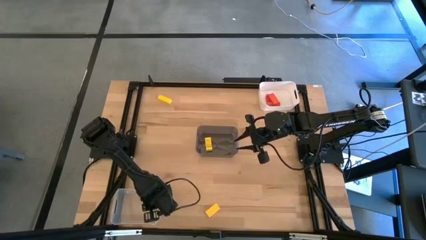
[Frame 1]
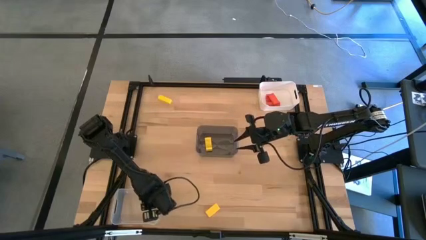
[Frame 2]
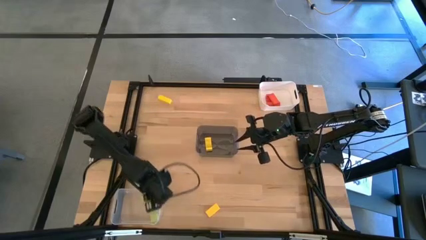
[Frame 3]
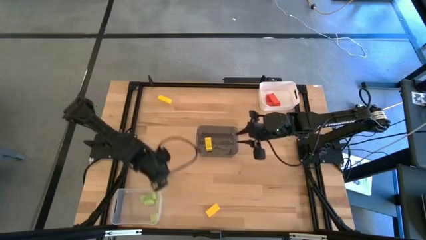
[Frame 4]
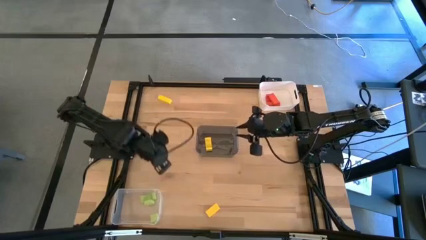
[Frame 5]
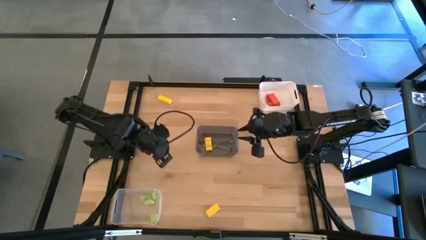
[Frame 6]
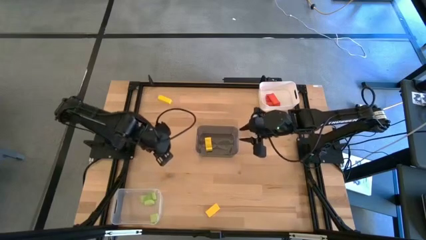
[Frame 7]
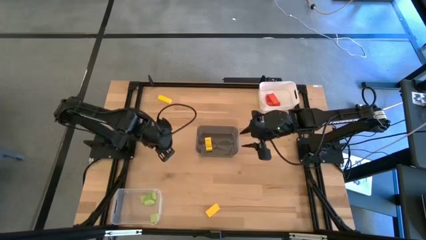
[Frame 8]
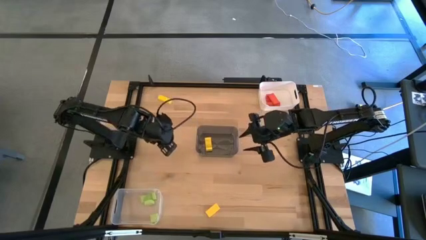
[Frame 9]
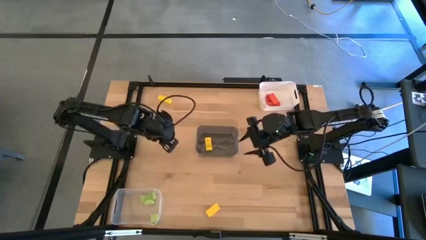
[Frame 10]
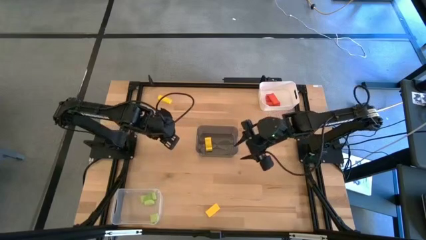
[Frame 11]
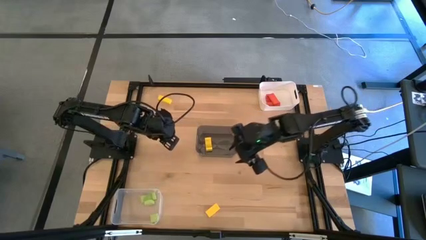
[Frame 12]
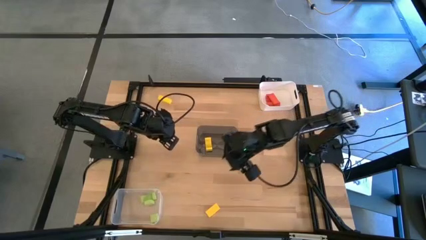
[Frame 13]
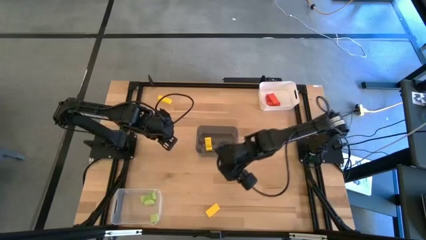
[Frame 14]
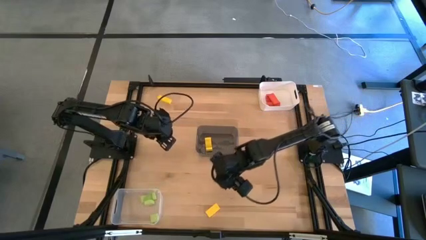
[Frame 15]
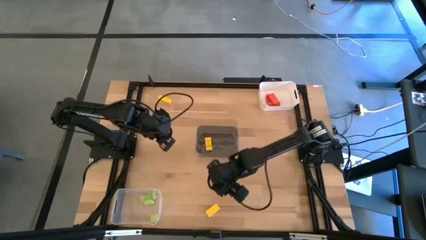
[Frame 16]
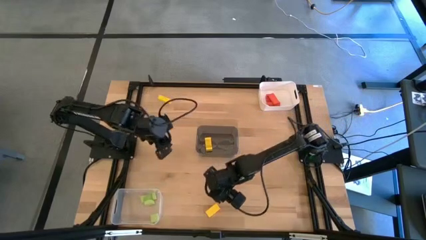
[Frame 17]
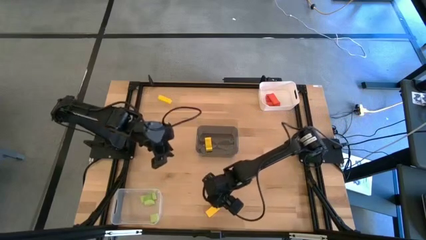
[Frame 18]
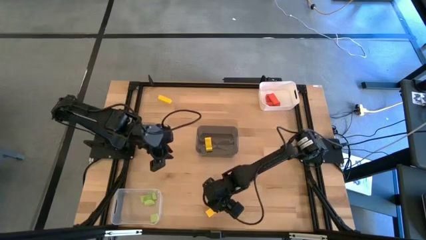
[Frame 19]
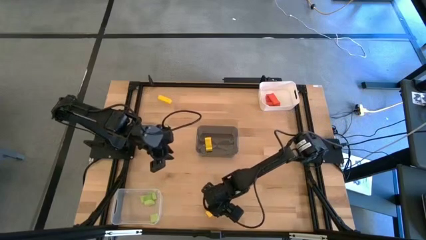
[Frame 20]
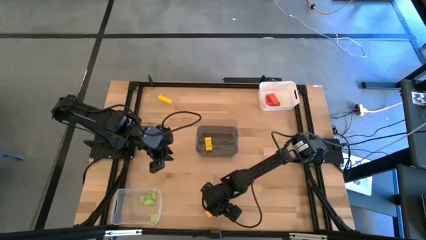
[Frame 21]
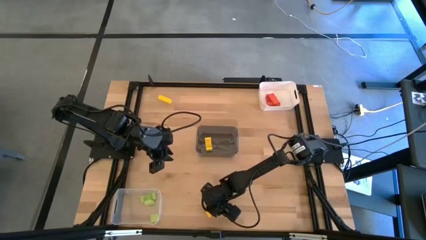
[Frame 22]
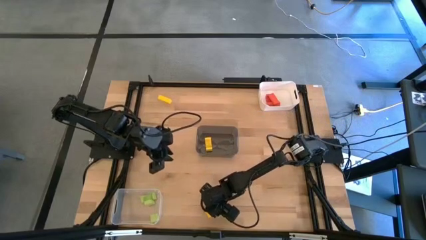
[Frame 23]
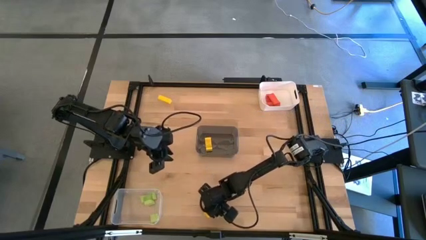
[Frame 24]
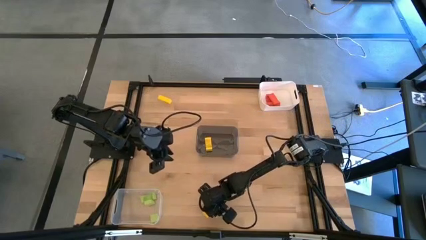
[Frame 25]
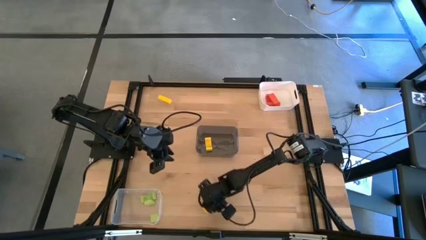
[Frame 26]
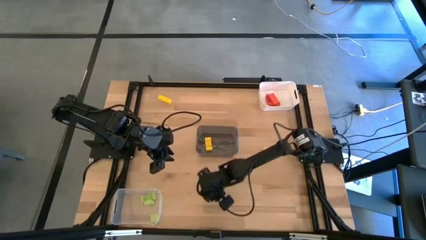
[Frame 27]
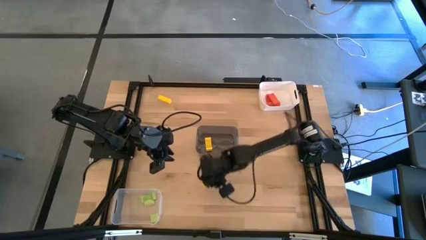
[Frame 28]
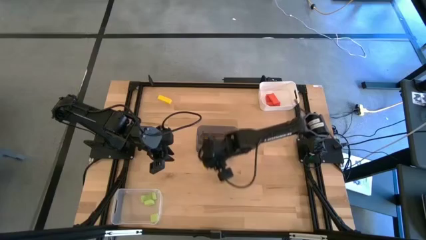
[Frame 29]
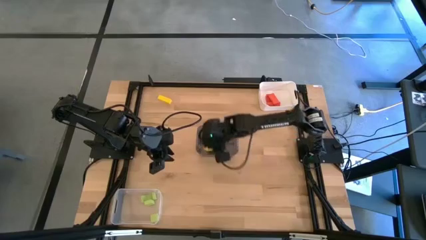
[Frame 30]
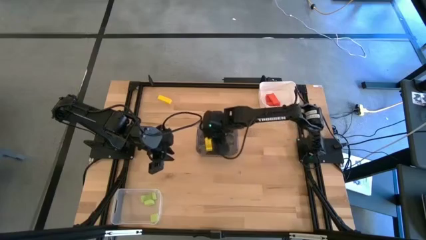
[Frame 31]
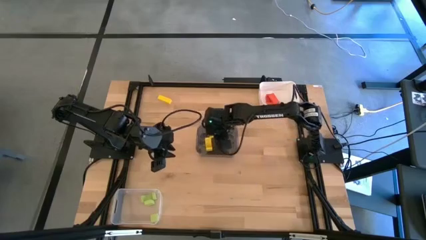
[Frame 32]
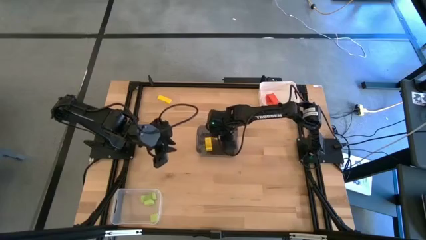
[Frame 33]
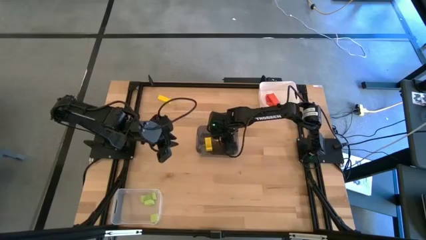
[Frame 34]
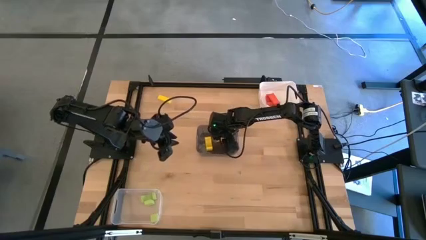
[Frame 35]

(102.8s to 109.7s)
Task: Sort & place blocks by color
Put the bottom yellow block into the black bin

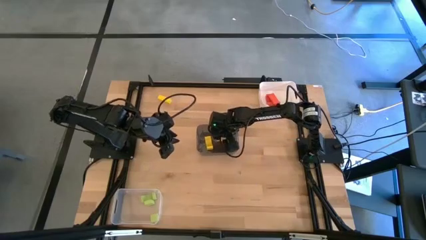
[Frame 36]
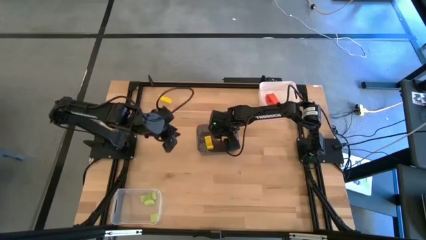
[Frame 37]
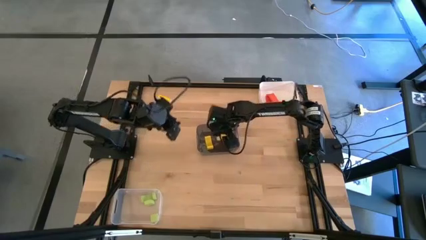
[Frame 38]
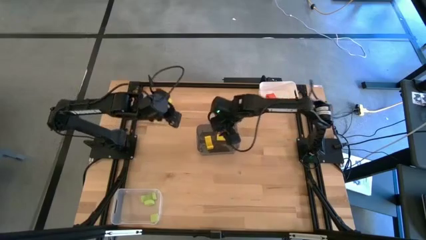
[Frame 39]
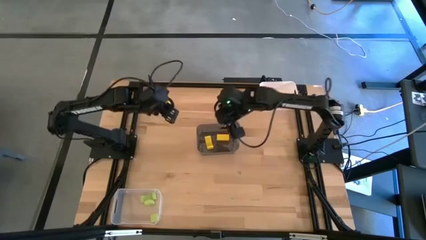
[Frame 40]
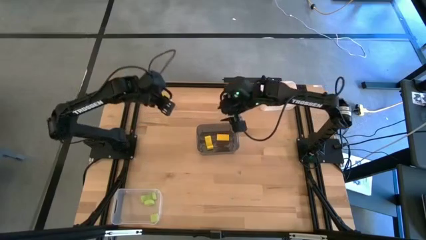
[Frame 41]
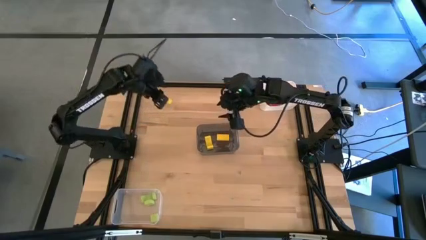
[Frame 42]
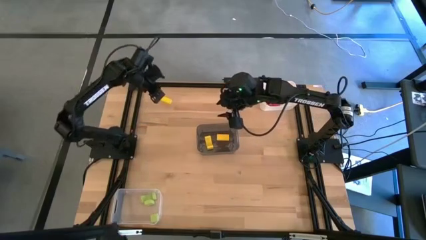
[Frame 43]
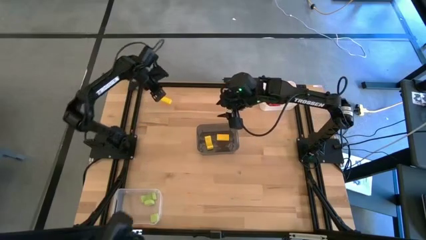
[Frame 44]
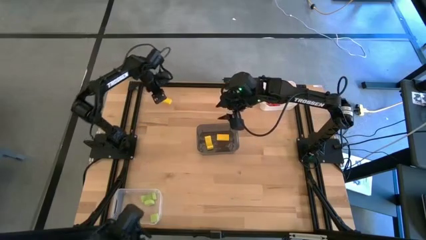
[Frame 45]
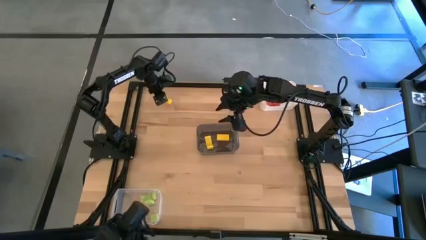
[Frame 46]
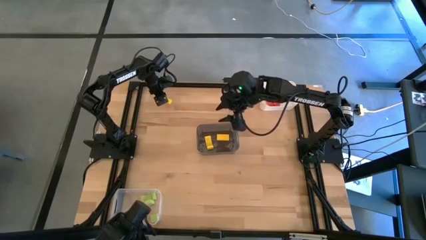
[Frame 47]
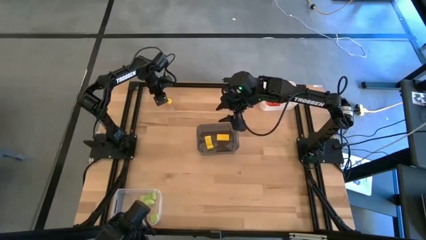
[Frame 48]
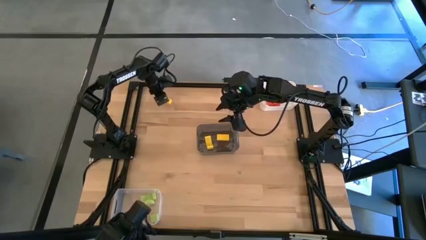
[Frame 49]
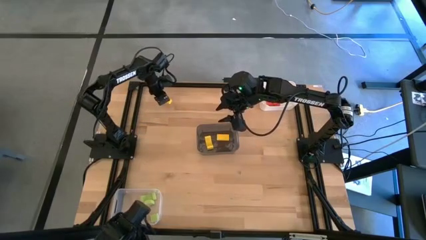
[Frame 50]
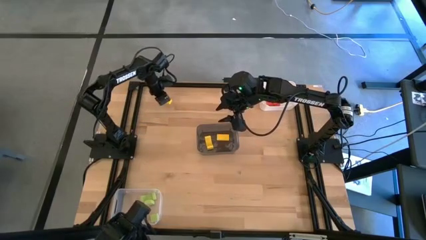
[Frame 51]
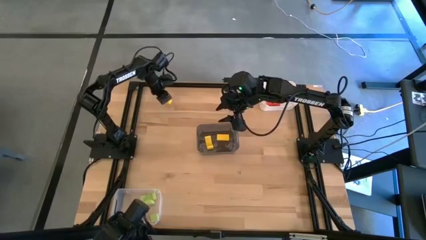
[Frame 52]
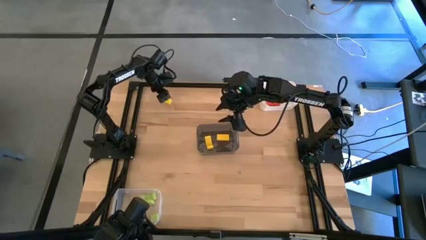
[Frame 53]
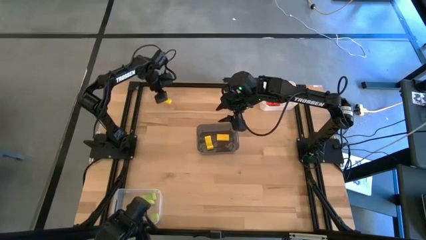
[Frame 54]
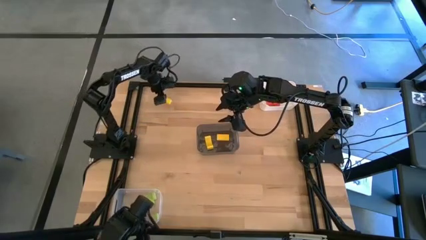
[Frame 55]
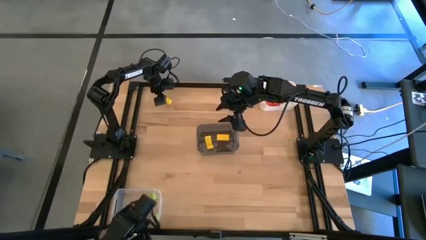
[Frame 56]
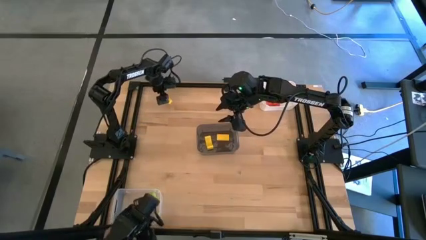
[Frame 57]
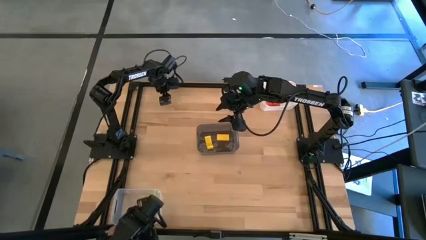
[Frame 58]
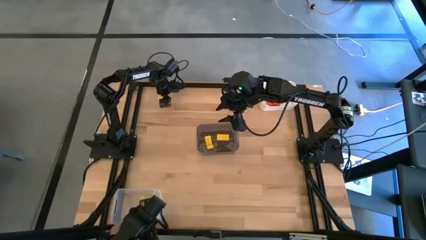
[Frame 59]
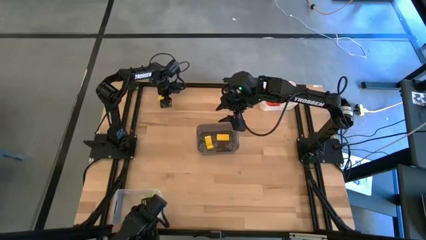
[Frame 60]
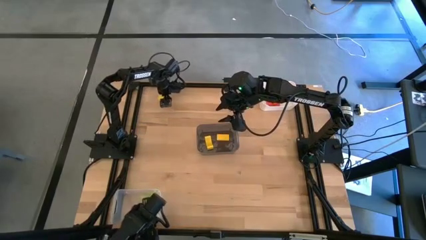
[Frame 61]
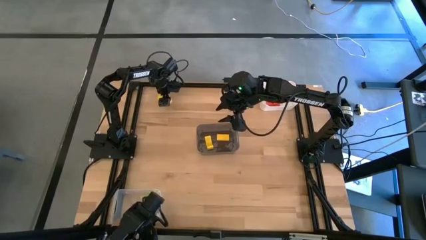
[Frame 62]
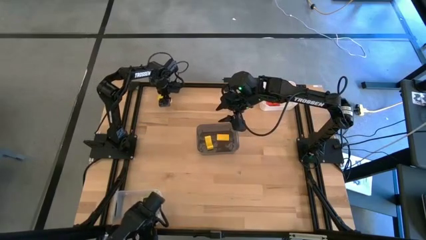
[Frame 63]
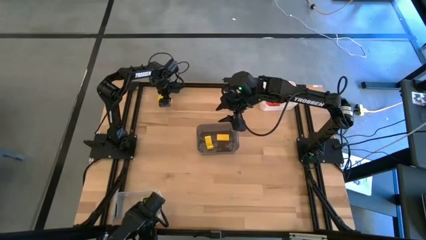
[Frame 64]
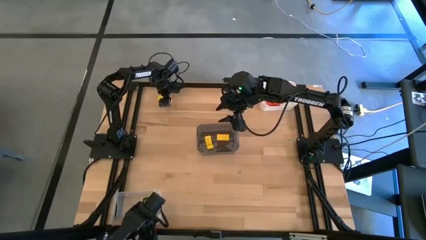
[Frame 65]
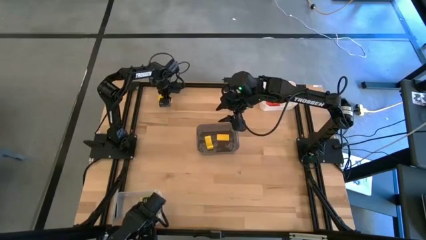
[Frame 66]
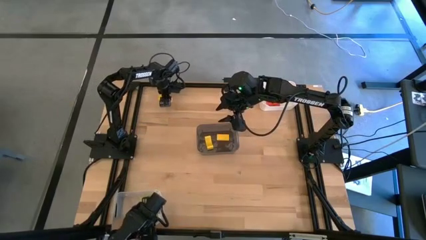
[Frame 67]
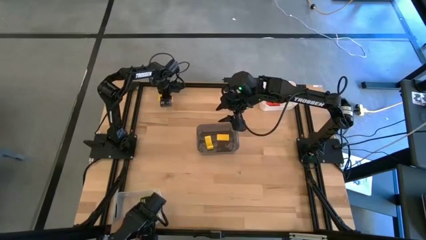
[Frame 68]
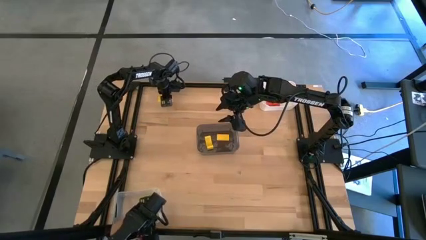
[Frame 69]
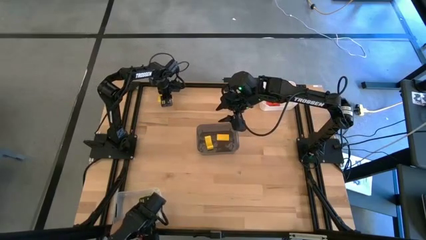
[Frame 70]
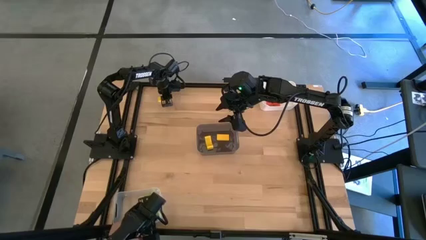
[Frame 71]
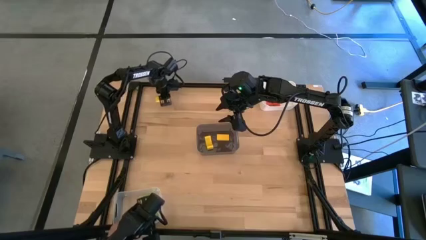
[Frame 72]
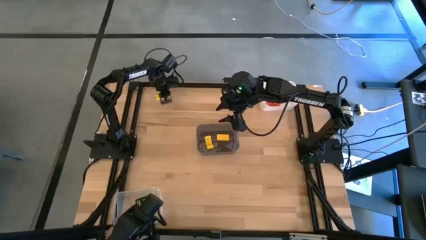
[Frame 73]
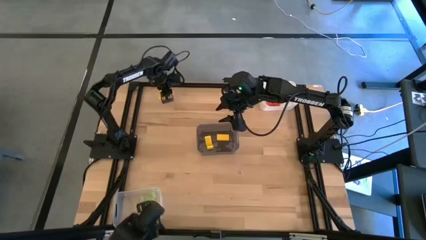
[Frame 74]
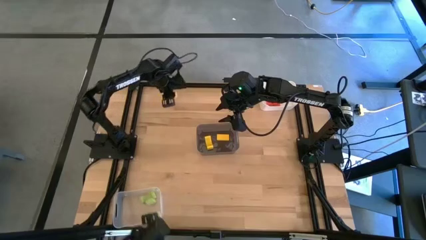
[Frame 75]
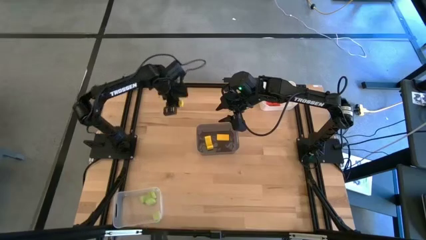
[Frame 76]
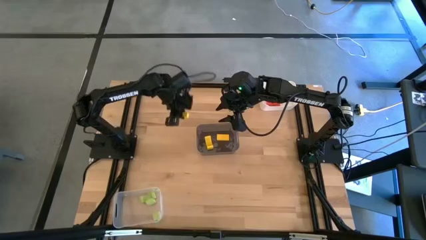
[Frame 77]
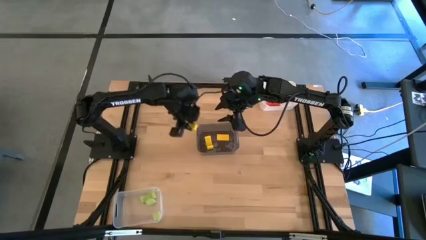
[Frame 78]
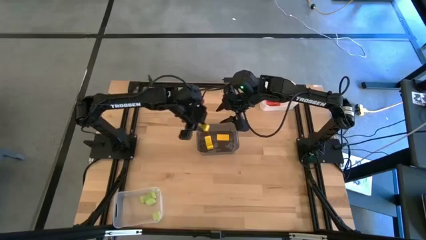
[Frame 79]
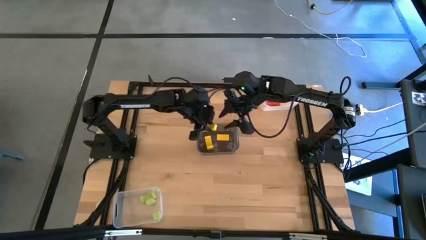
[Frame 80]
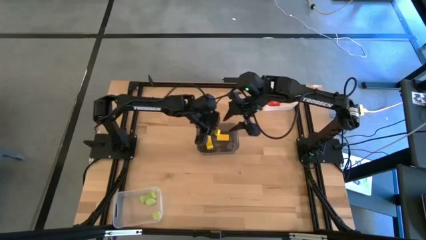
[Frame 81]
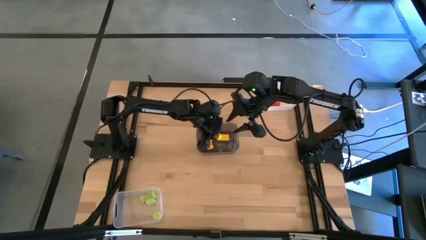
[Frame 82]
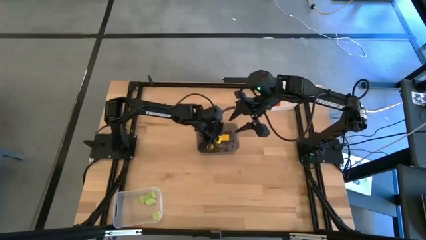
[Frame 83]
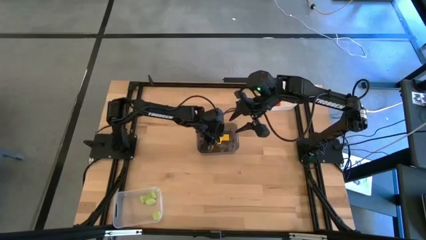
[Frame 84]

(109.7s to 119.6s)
Put the yellow block into the black bin
